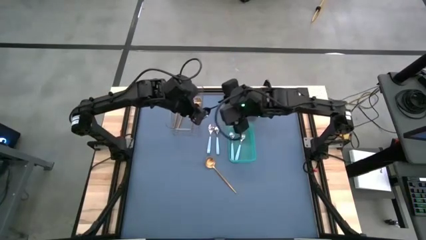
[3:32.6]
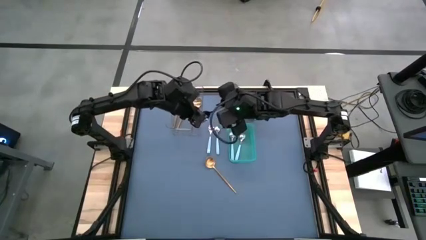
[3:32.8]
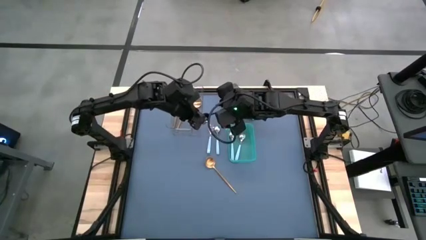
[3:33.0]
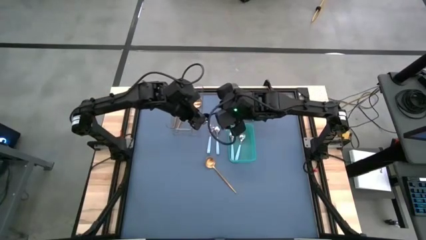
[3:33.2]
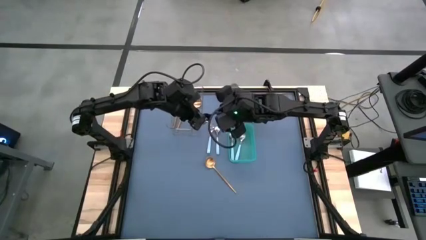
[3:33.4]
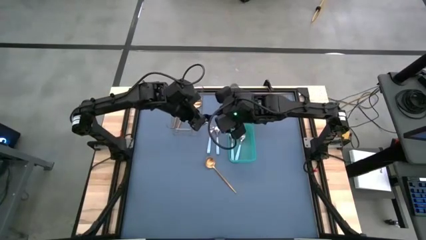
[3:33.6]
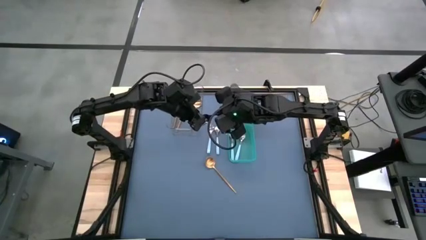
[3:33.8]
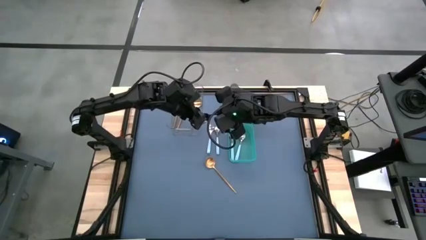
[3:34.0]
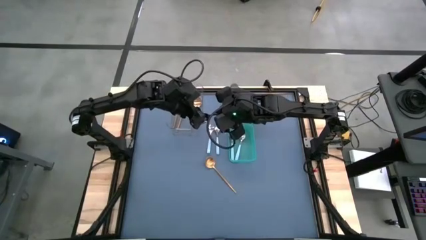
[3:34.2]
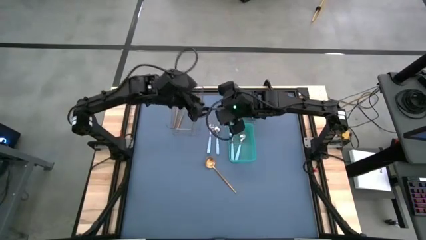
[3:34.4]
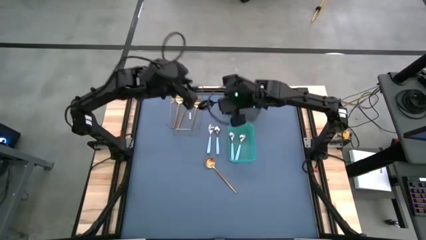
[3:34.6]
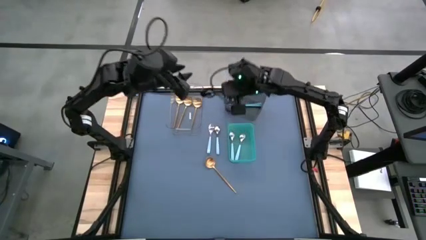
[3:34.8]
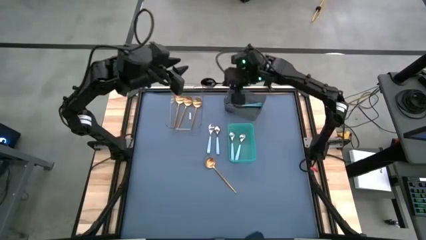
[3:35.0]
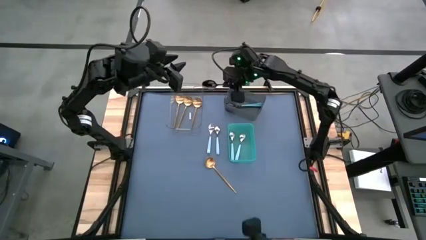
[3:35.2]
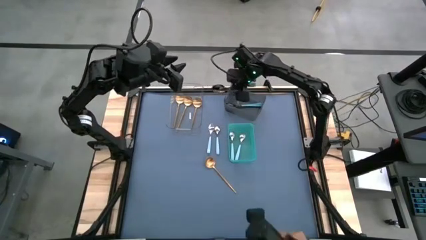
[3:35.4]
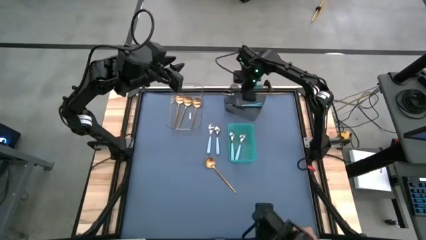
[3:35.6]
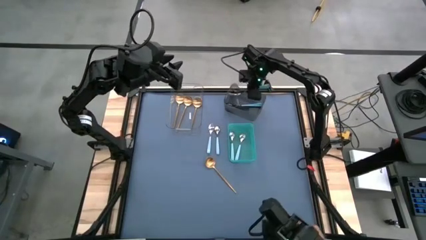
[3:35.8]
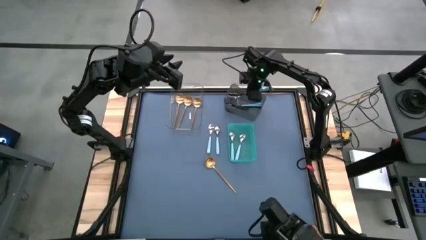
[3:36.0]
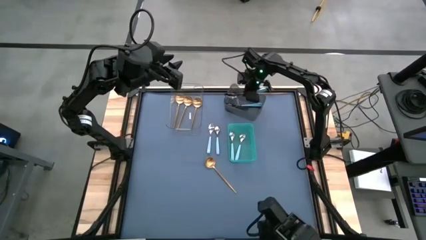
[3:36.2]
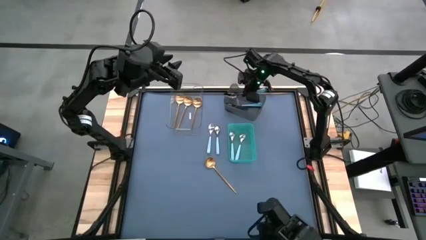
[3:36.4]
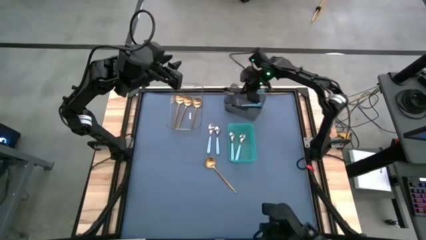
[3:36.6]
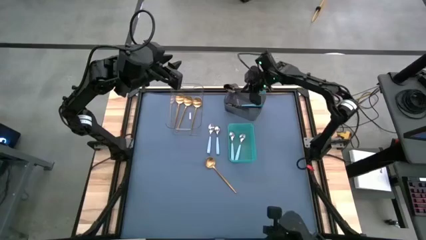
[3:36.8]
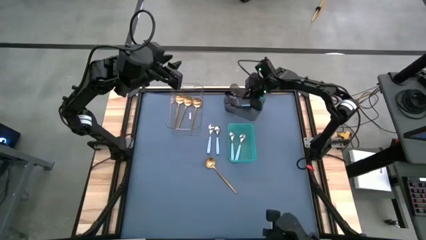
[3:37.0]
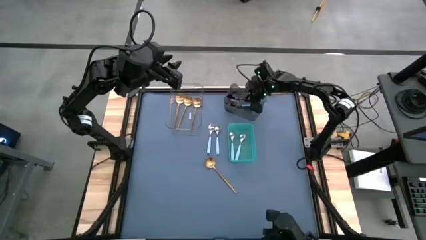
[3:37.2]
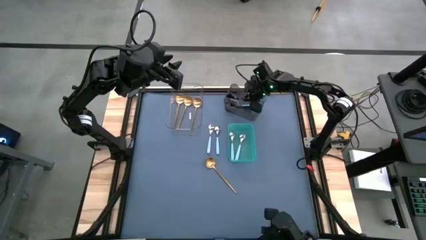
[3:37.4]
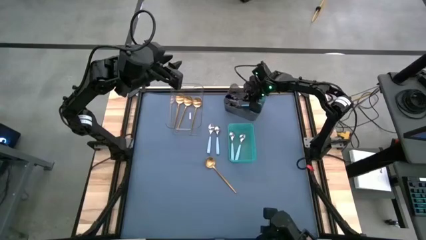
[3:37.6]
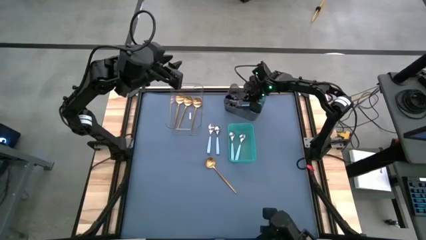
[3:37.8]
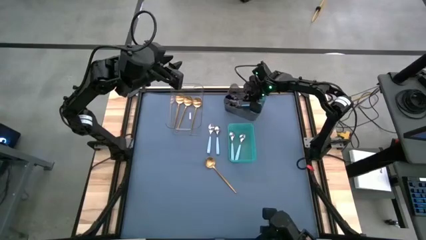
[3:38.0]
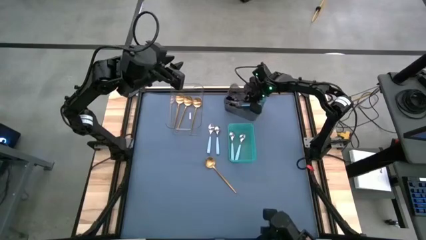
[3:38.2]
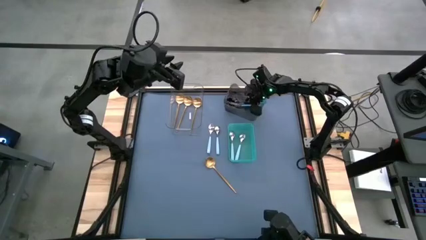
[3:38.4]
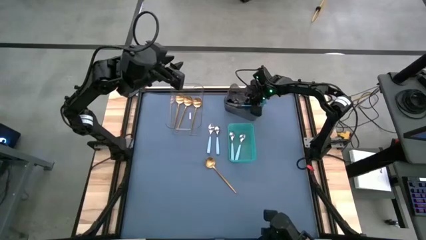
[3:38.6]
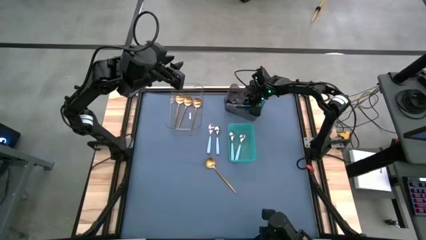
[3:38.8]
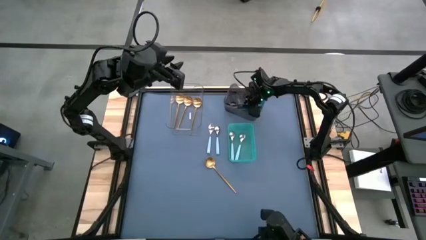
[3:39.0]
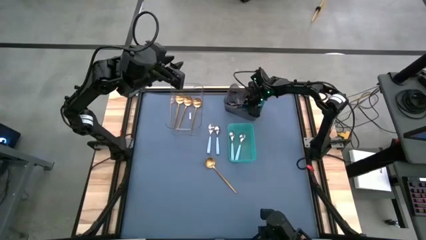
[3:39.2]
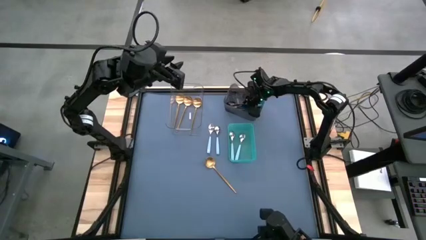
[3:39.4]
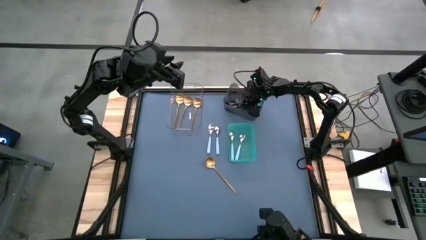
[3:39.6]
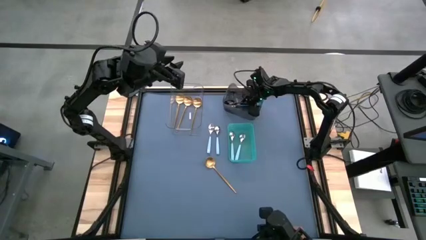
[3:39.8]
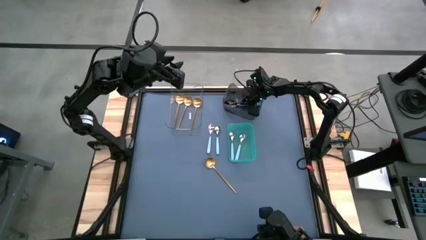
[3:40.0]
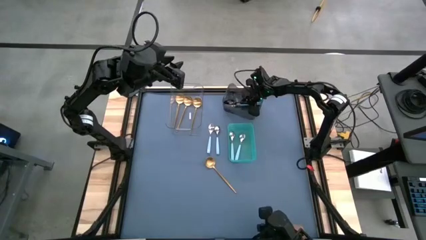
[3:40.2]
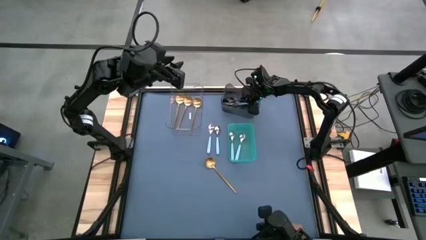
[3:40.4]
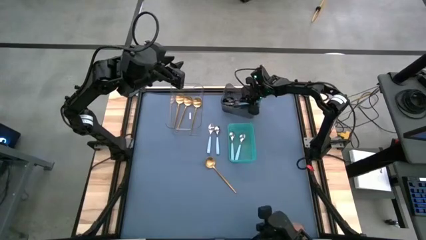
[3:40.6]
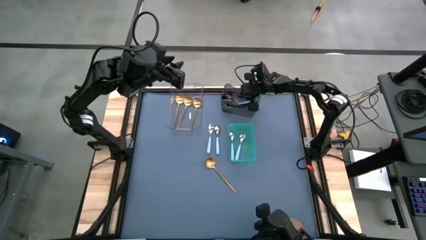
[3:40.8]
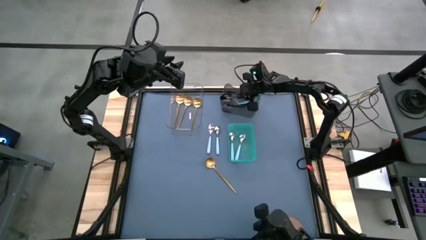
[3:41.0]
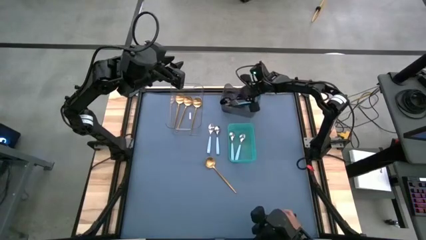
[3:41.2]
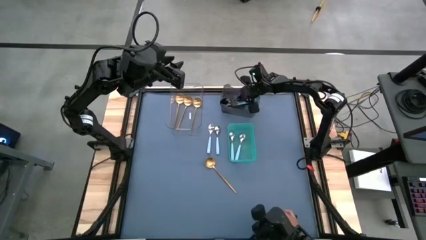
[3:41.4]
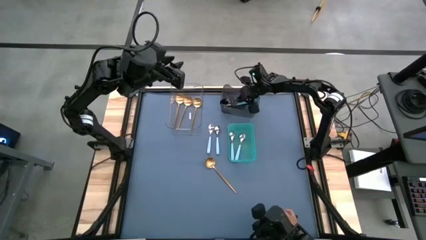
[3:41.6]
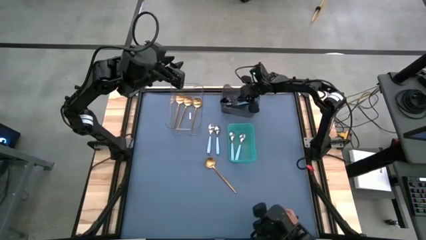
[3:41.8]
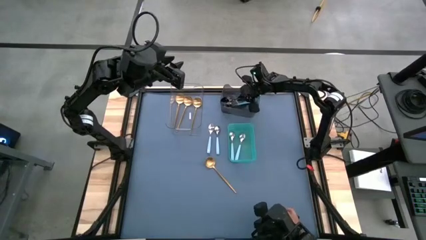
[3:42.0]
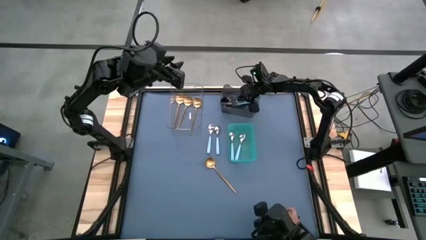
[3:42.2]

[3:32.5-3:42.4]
Task: Sort silverware by color (type)
Put the blue spoon into the black bin
